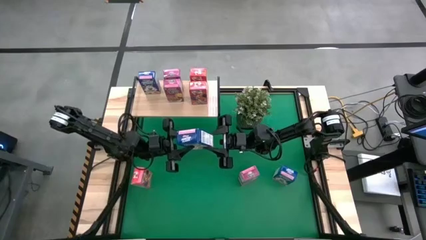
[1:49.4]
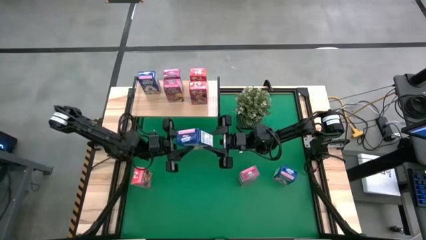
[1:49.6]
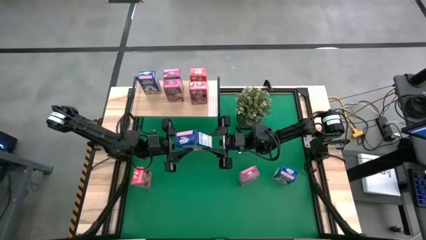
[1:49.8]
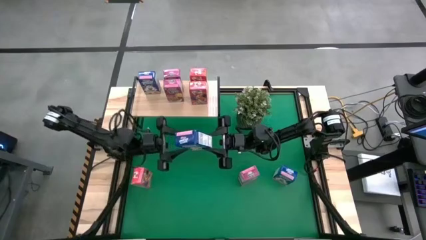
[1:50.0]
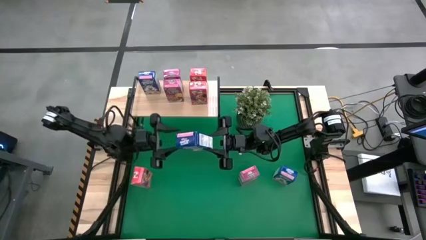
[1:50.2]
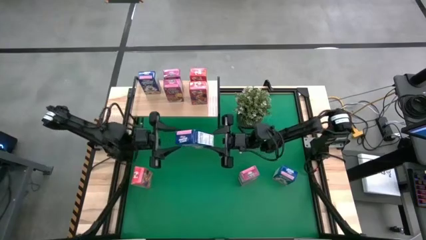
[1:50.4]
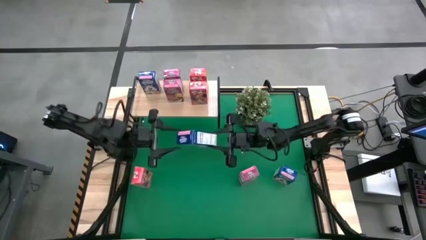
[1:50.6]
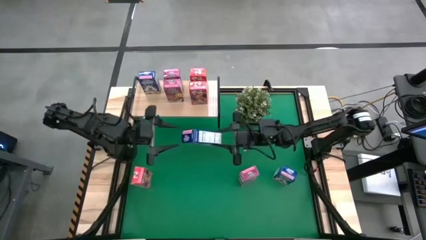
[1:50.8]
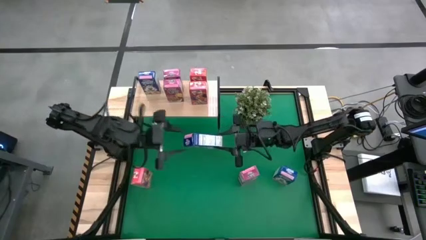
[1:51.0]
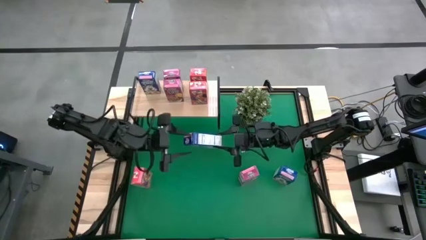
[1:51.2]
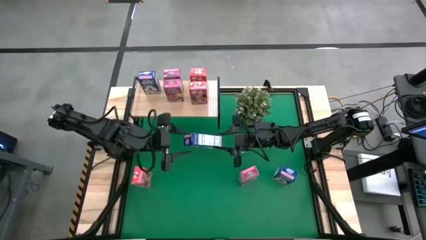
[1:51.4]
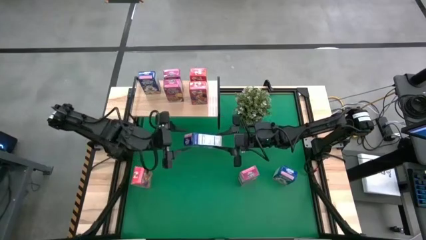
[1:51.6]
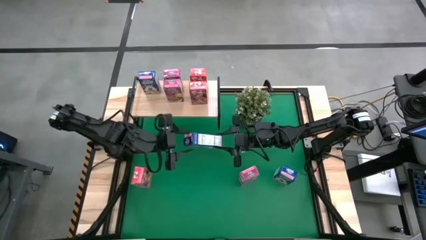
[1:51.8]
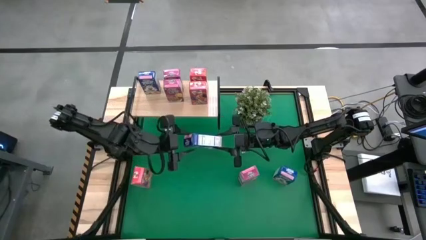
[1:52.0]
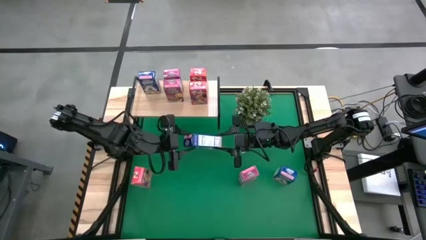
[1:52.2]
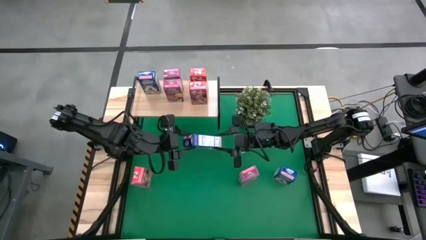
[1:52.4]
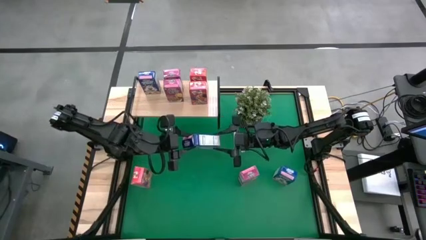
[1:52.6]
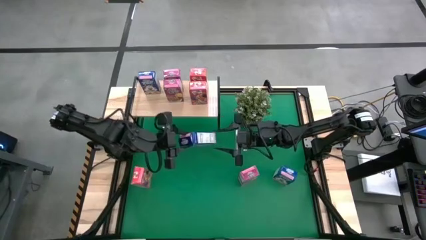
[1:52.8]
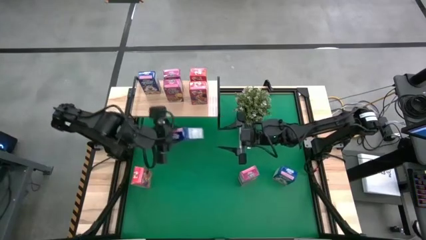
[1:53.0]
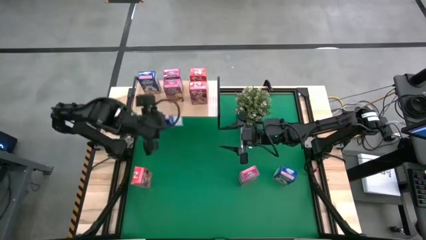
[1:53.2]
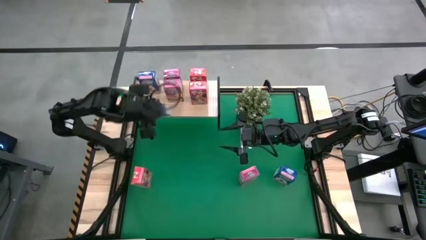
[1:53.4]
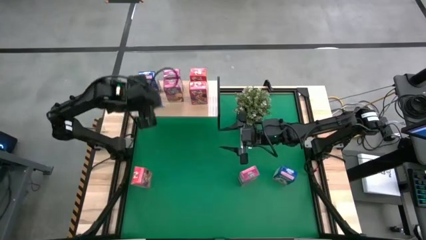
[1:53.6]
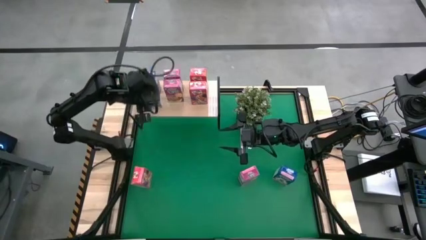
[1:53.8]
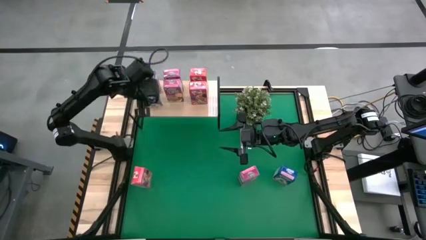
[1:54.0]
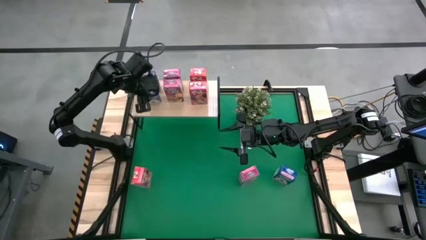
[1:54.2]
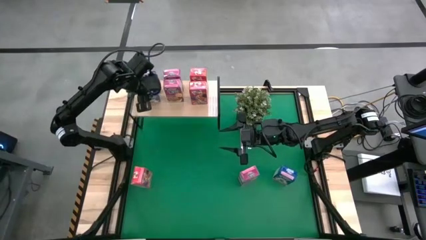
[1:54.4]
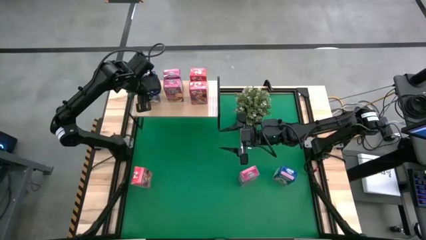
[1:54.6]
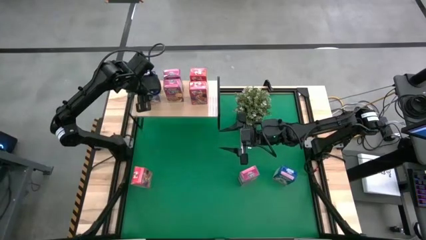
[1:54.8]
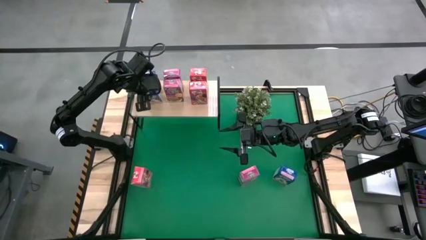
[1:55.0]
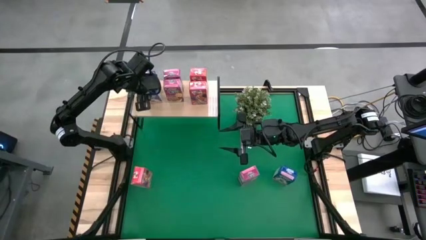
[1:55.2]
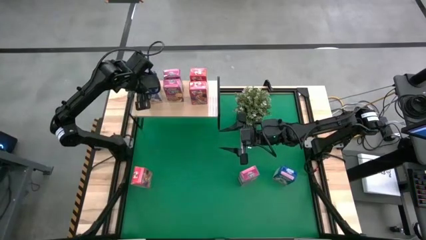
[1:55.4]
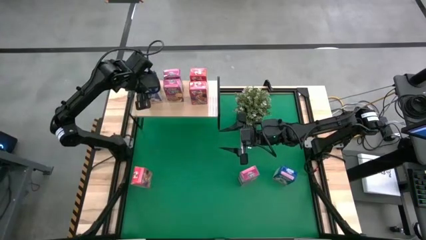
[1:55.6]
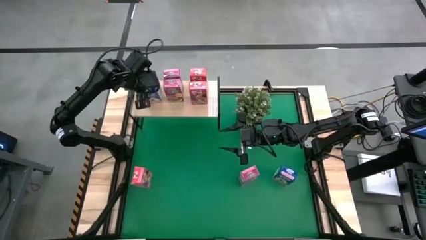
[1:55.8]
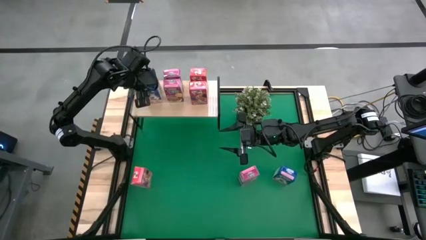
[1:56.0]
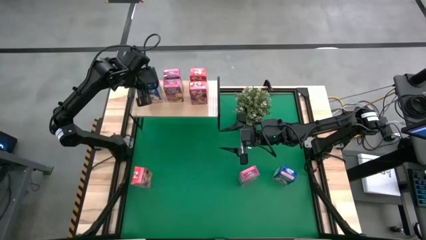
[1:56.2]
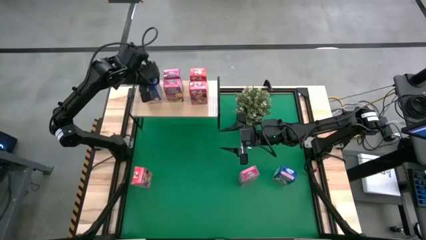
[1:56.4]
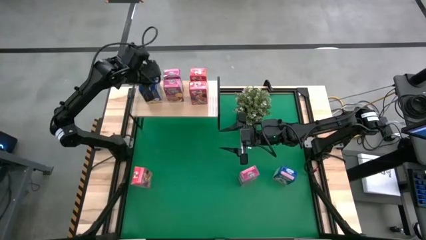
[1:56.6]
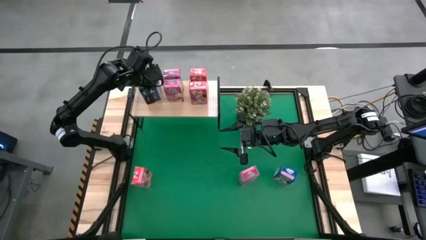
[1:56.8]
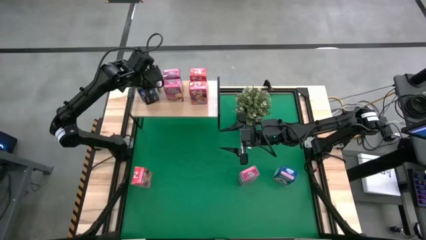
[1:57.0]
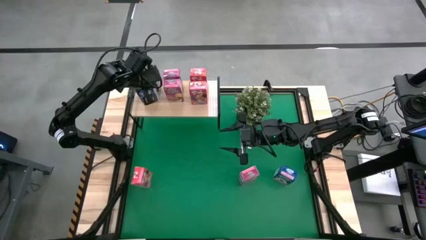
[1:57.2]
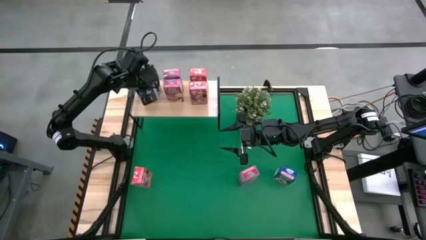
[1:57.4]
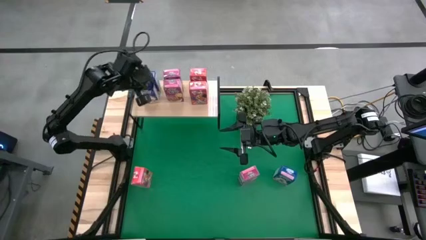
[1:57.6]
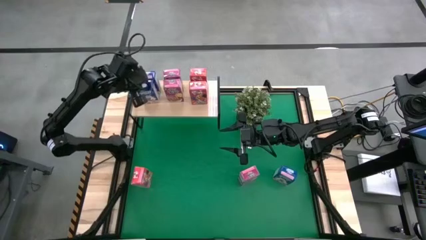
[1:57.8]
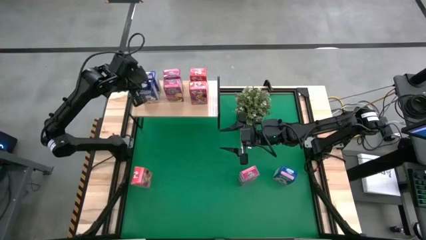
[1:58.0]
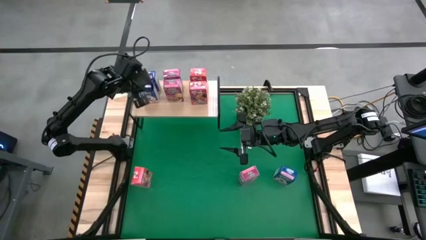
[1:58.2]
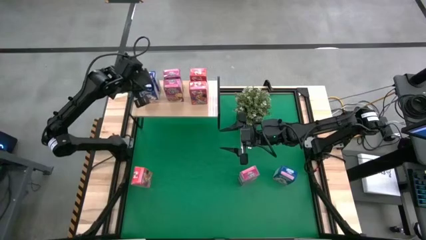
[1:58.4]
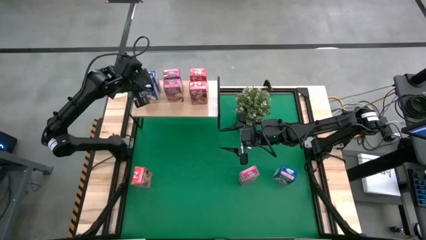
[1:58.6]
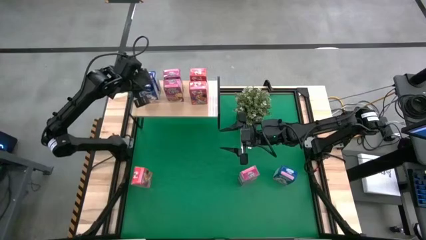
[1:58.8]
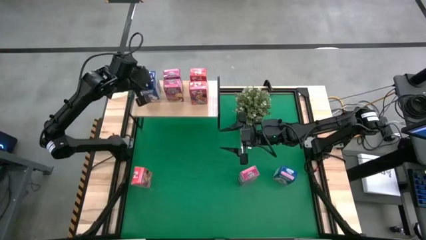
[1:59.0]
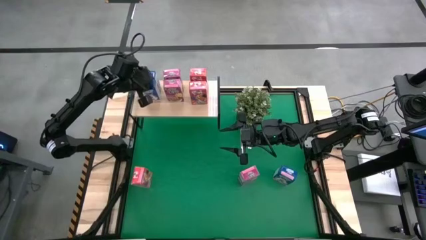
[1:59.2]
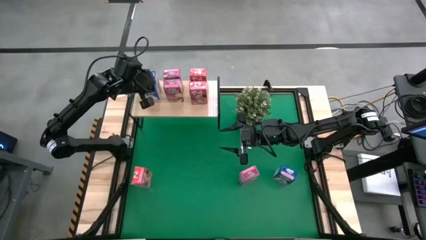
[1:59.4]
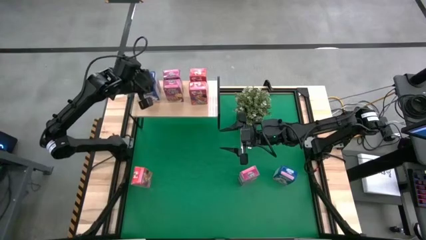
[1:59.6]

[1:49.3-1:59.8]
Task: Stack cereal on shelf
Put the bottom blue cereal box on the shelf
